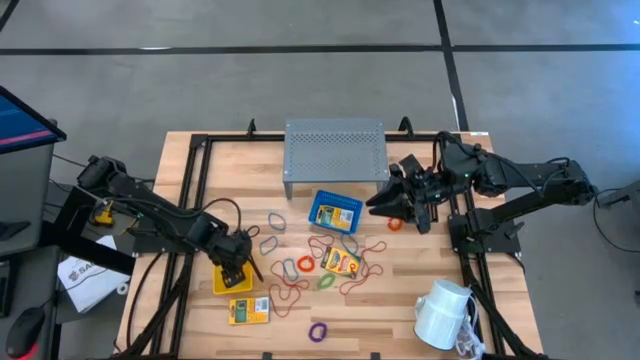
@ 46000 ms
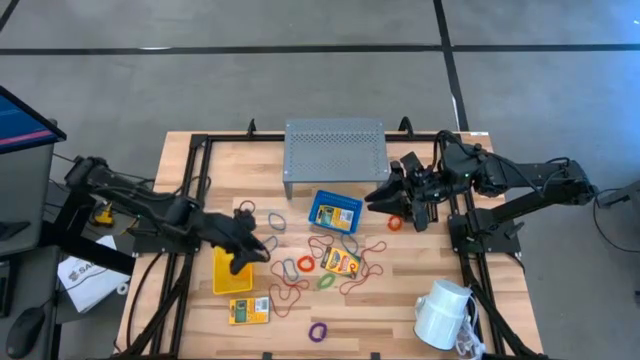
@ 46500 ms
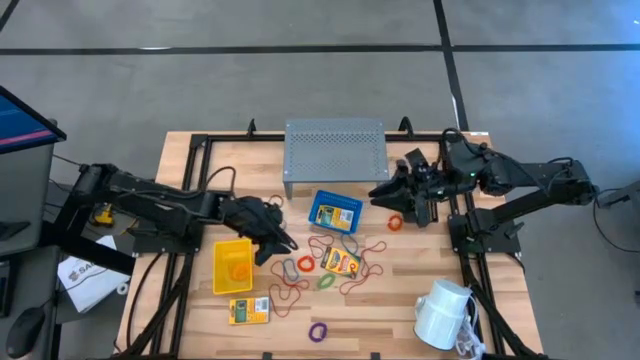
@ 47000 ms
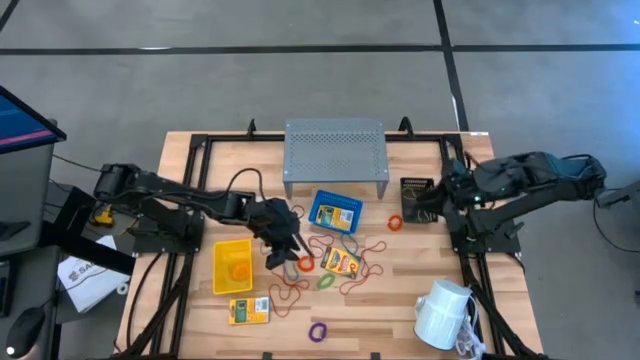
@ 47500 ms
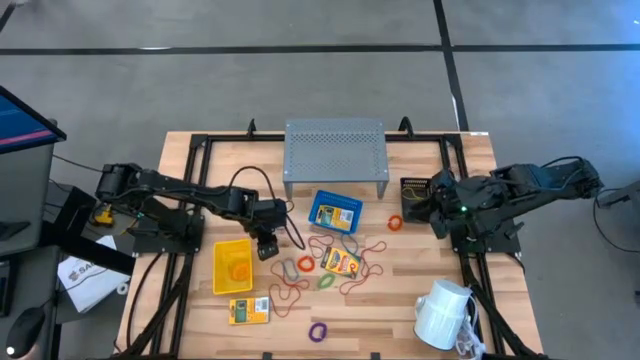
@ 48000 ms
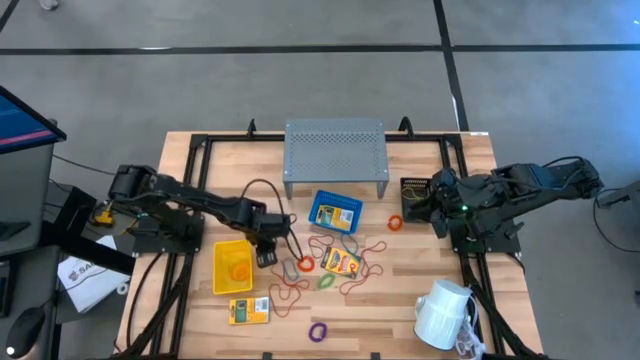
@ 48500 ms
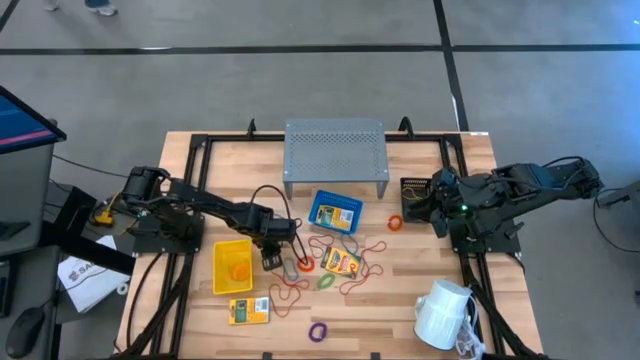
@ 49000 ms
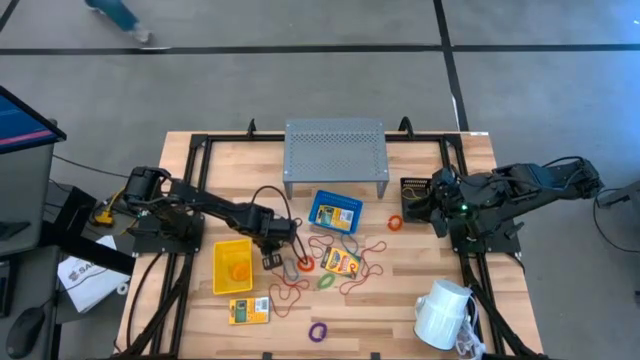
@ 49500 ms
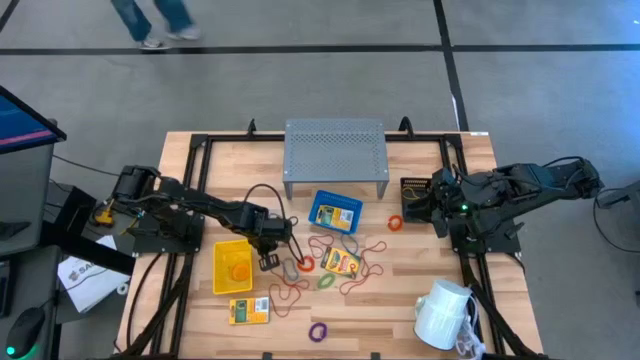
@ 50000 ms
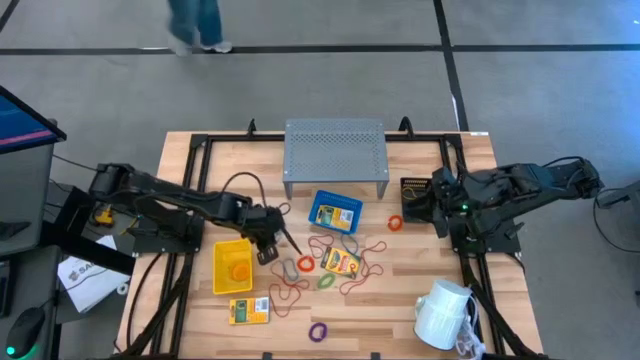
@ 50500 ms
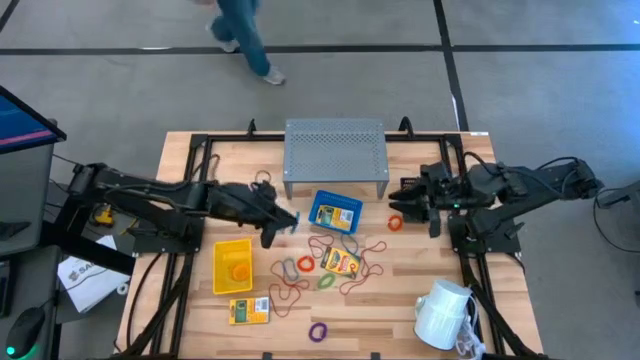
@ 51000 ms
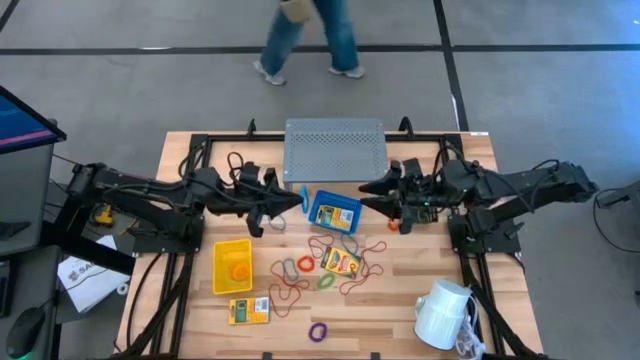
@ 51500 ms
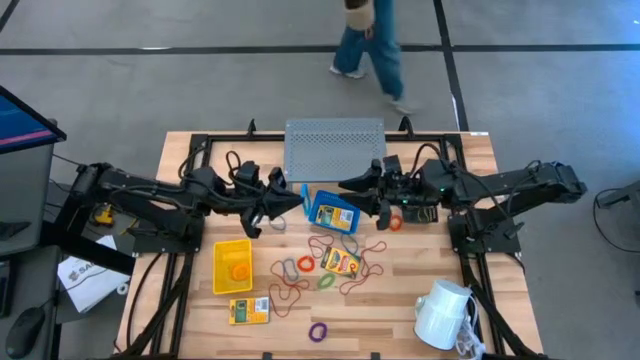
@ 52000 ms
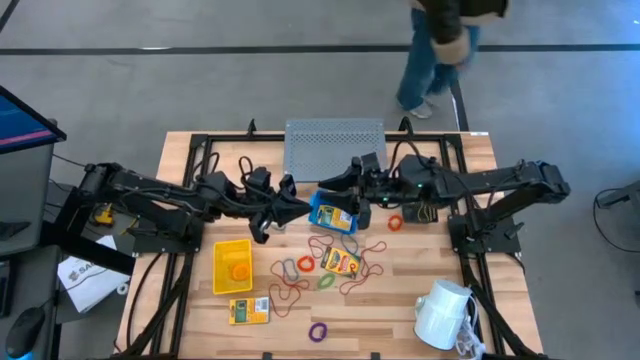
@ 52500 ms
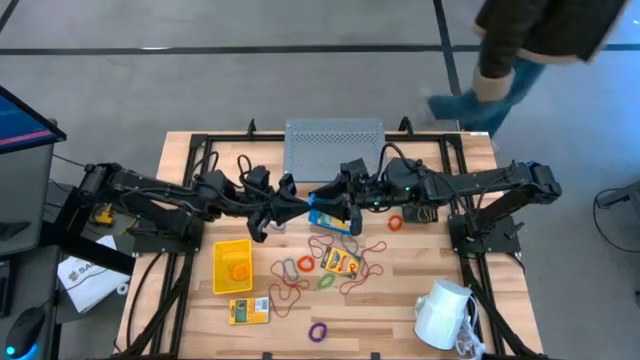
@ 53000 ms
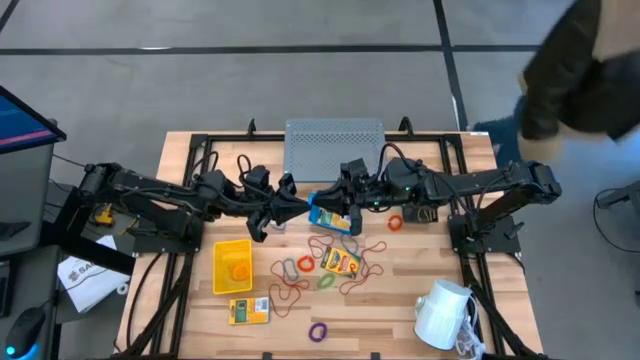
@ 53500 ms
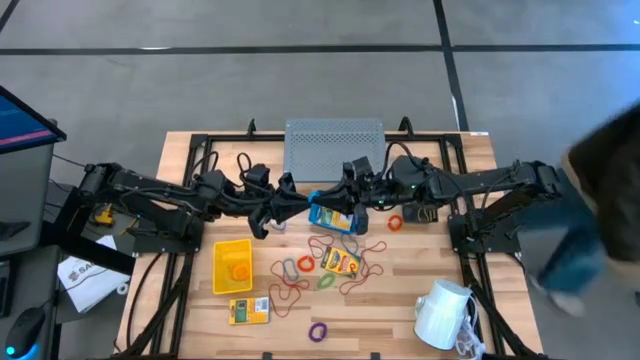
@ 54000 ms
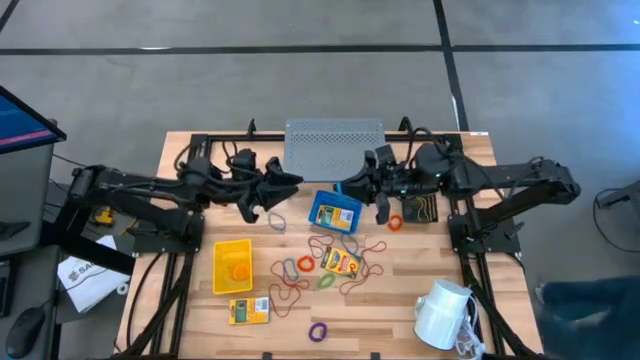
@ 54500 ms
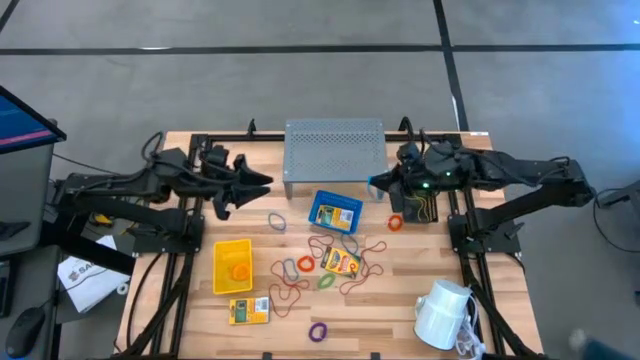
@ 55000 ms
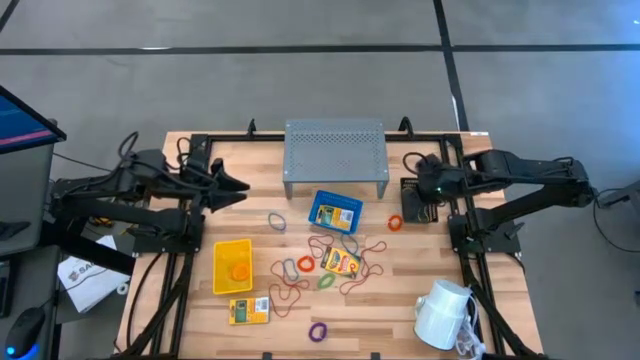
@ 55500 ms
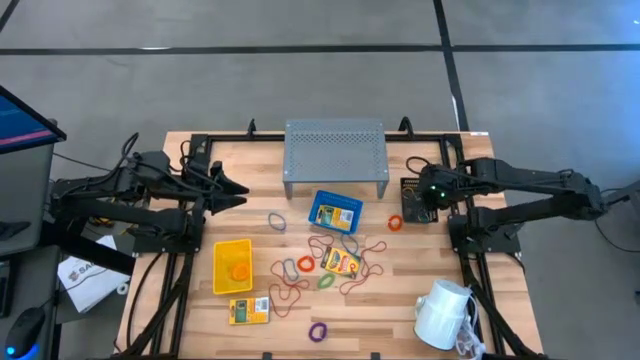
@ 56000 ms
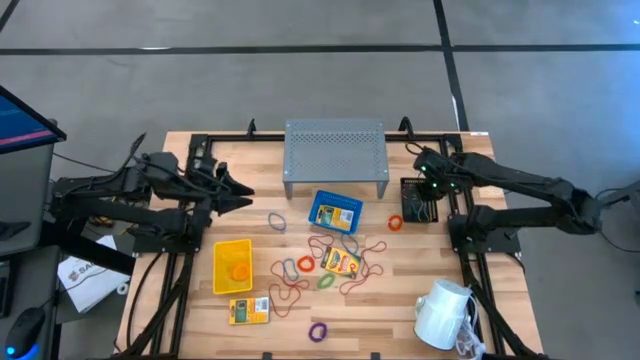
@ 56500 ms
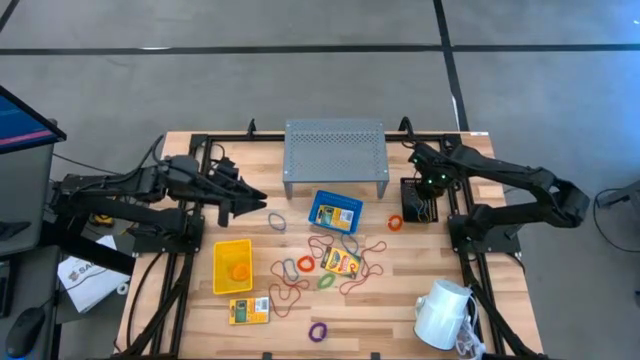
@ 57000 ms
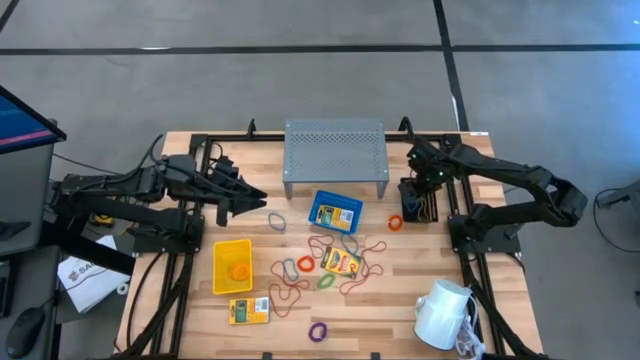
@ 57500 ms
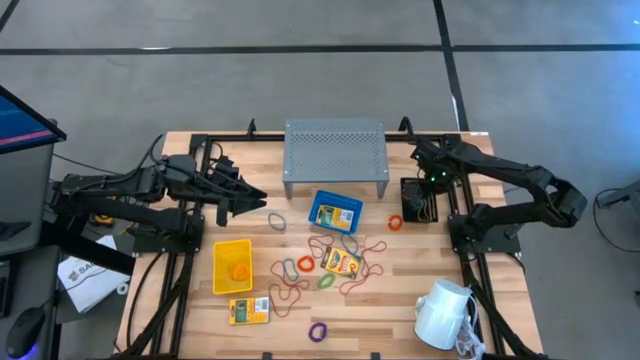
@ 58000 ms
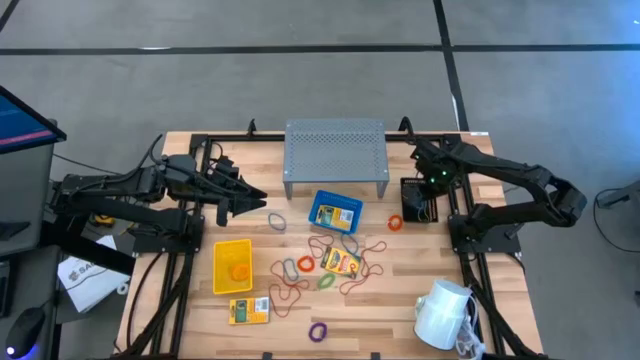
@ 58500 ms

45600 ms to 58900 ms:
Task: Pick & Place Office Desk Supplies
Put the blue rubber band into the black bin

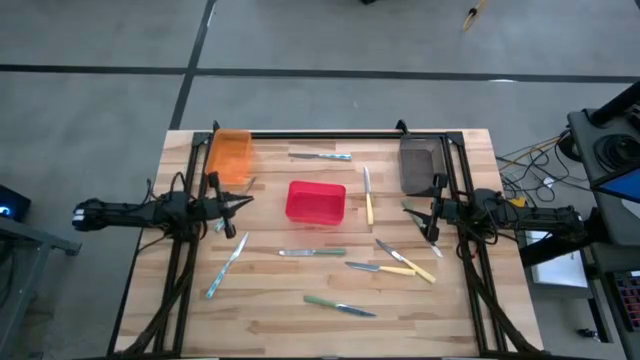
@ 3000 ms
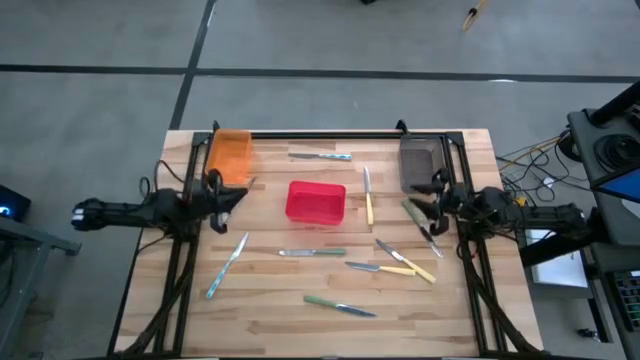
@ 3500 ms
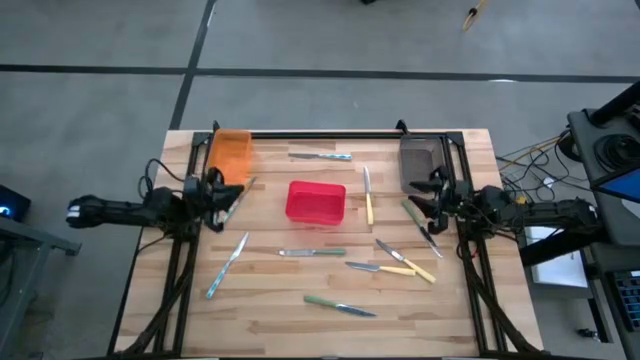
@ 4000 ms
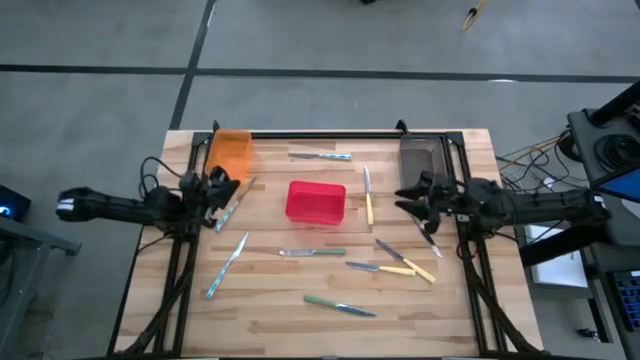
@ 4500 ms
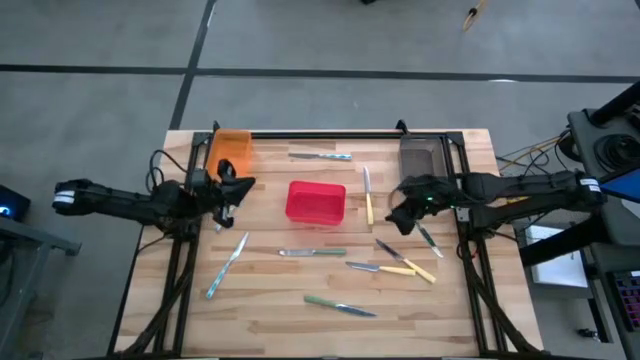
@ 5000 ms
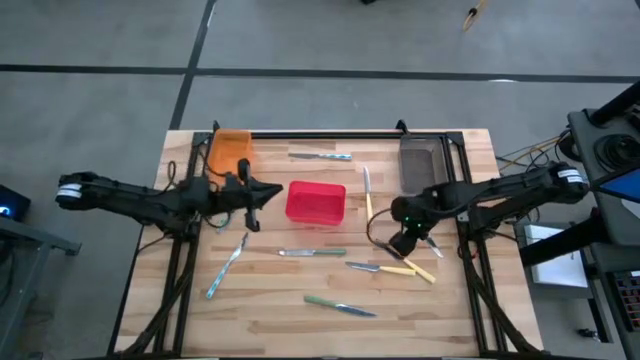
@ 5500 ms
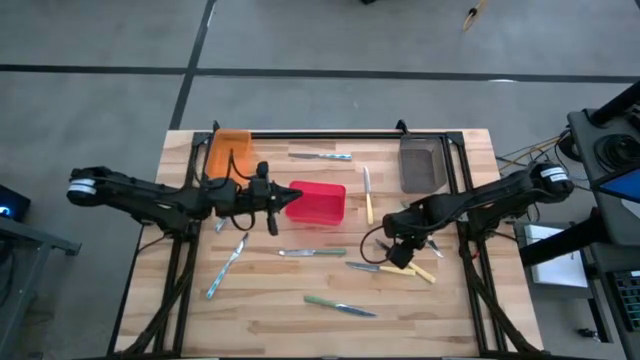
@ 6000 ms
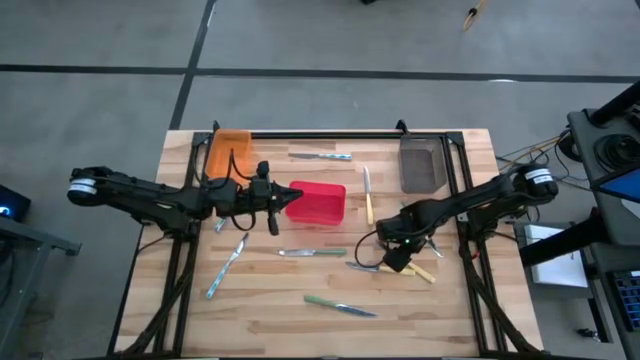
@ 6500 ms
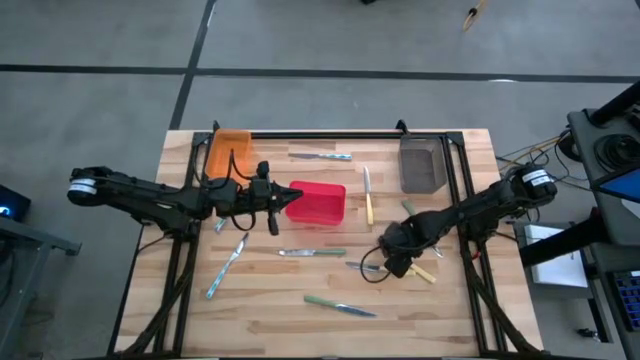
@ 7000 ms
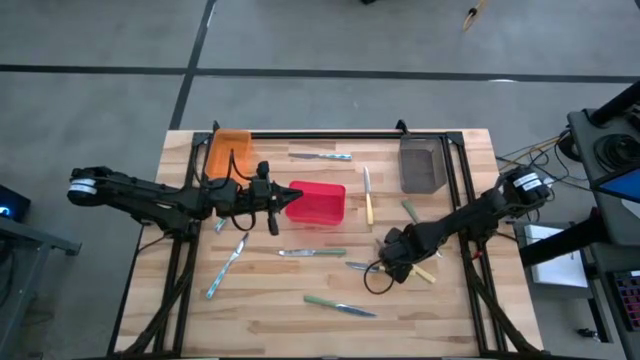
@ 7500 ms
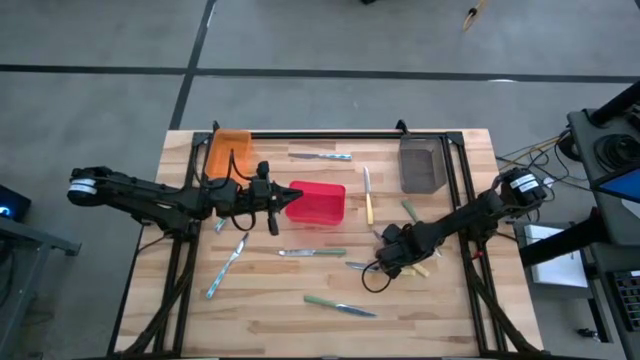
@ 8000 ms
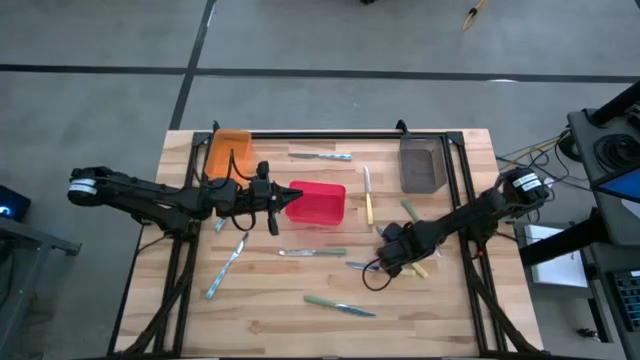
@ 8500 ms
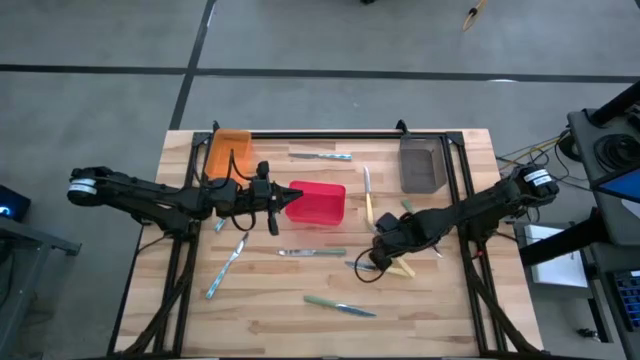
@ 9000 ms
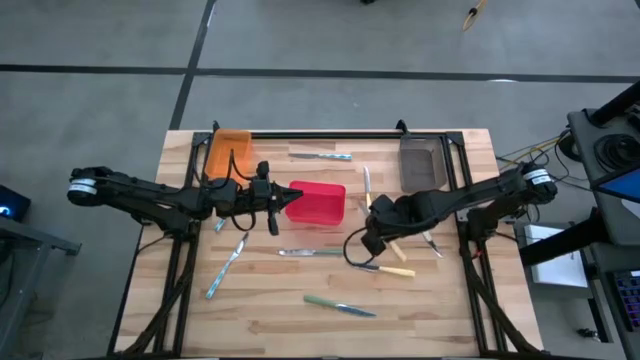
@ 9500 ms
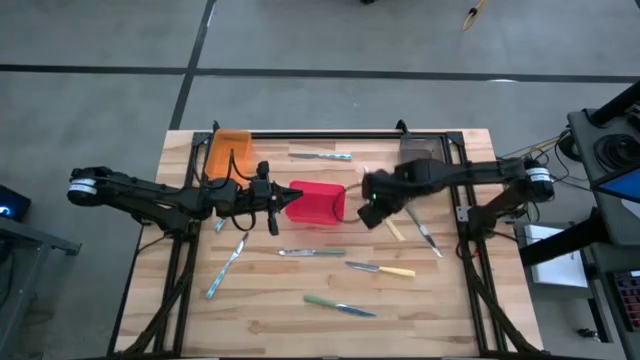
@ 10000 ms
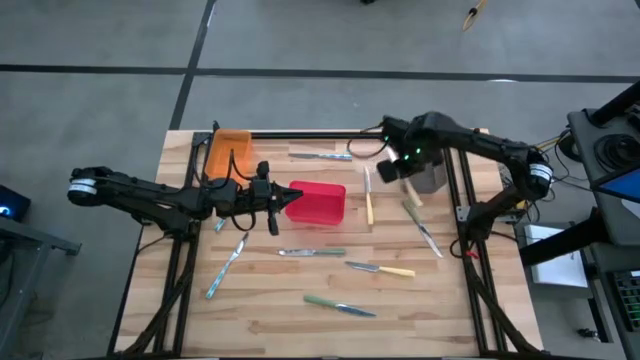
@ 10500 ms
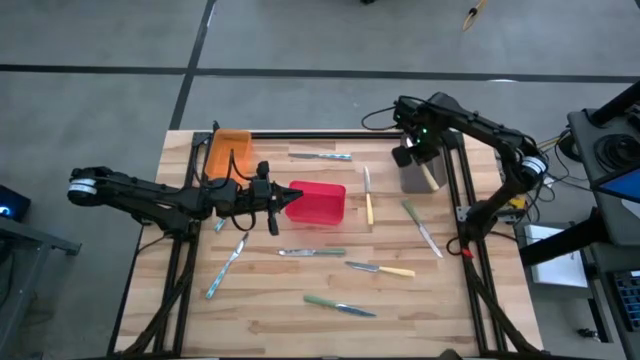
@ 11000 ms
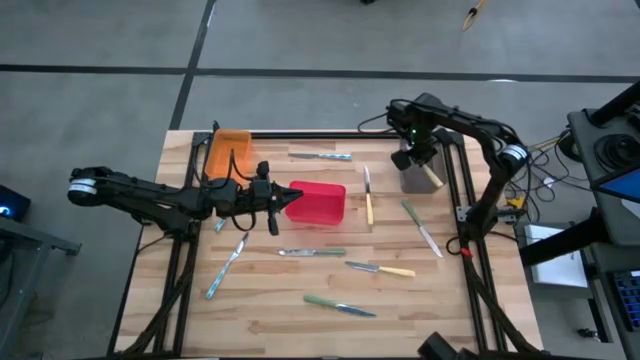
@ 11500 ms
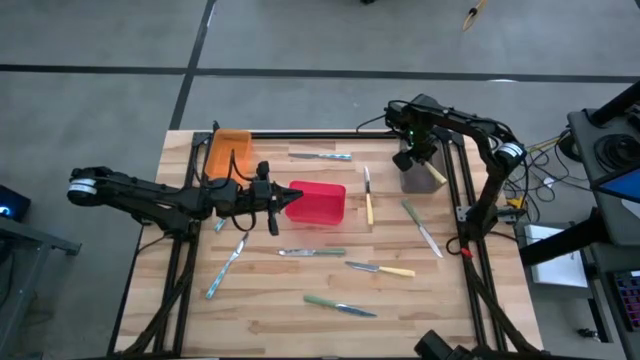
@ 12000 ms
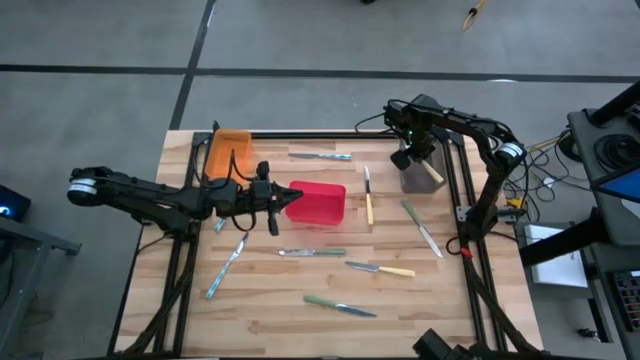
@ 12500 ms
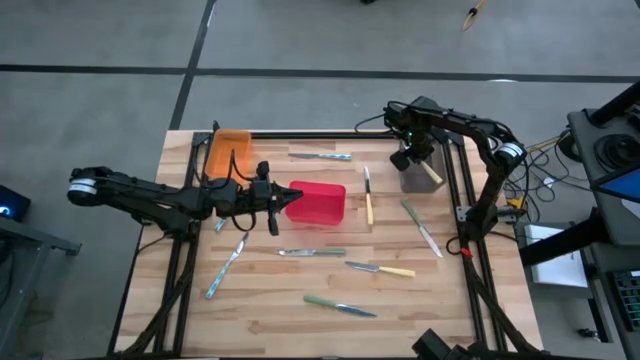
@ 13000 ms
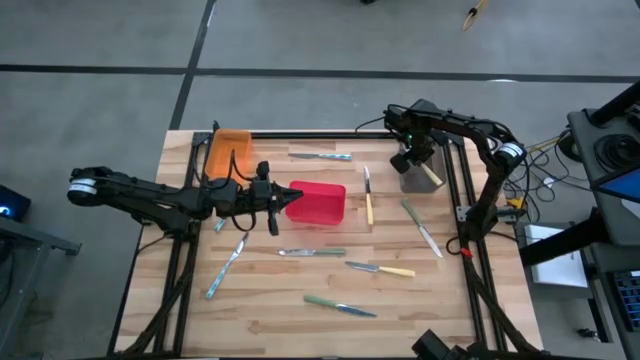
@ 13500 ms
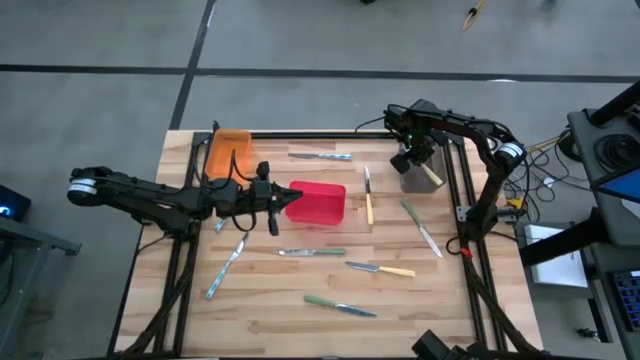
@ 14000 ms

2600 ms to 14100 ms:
Task: Sort silverware by color (type)
Put the bottom right yellow table knife into the black bin
